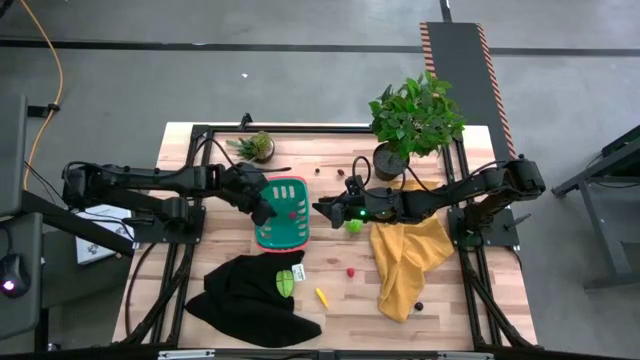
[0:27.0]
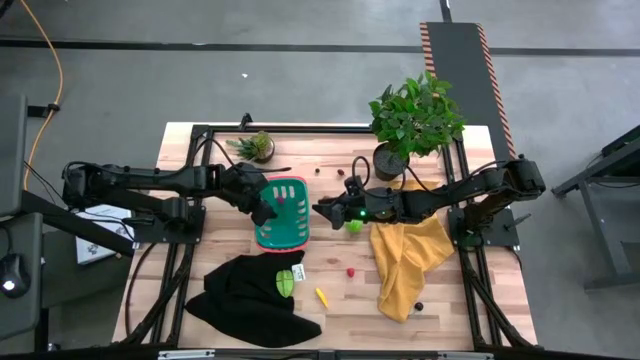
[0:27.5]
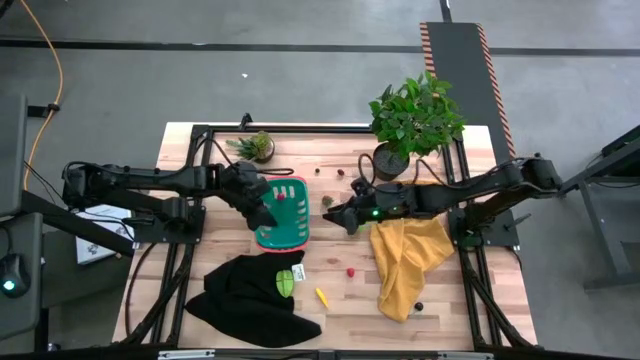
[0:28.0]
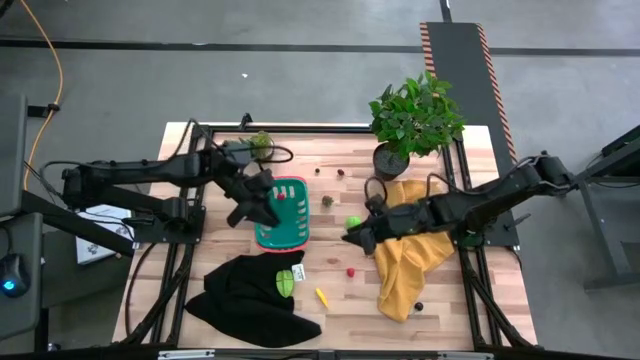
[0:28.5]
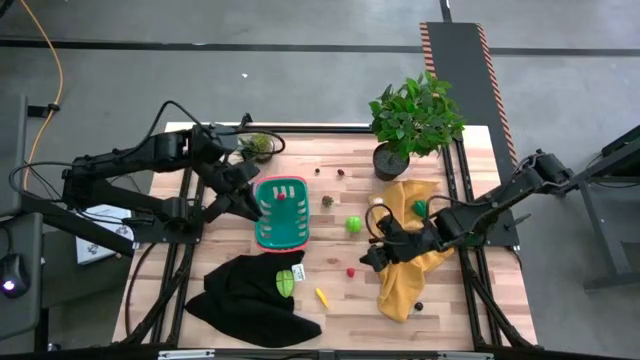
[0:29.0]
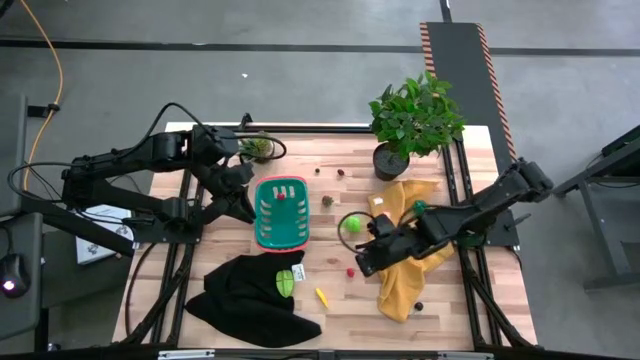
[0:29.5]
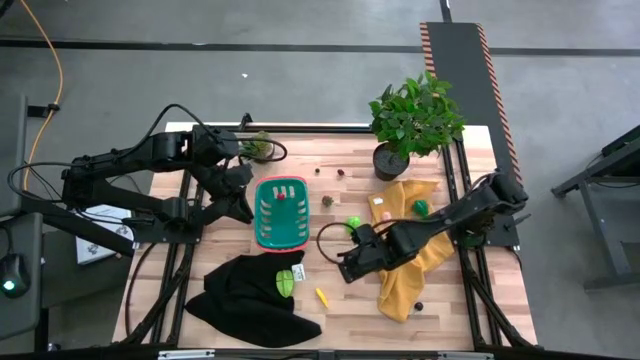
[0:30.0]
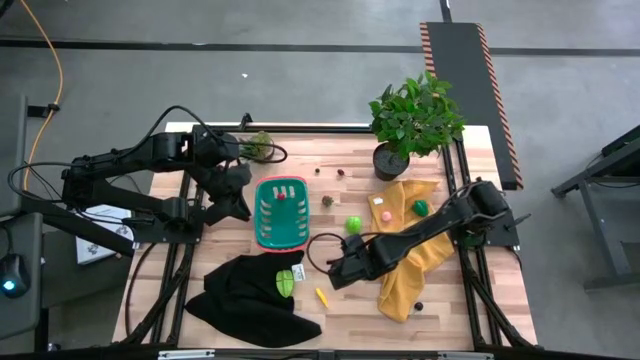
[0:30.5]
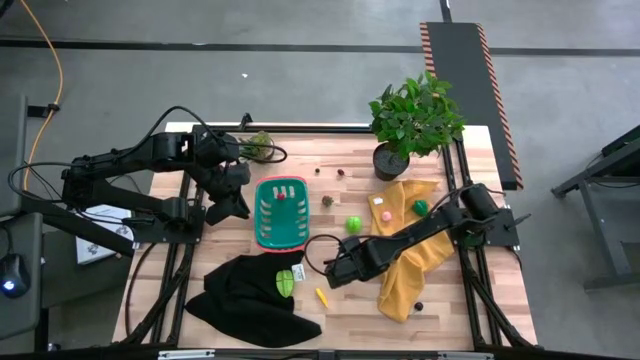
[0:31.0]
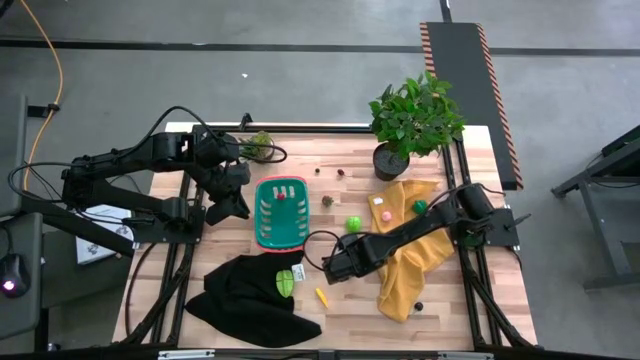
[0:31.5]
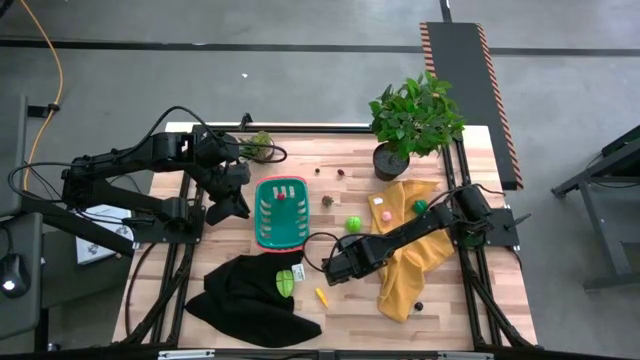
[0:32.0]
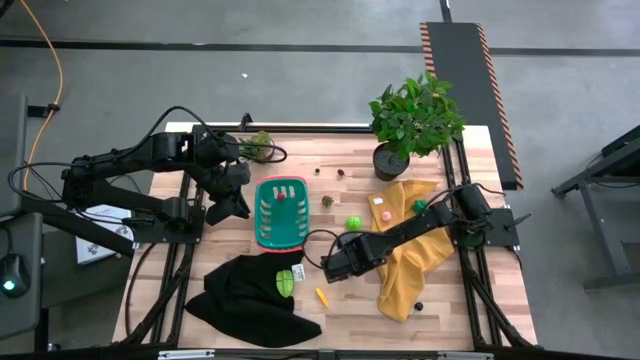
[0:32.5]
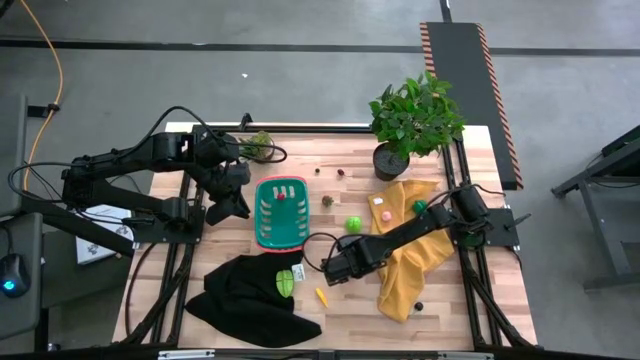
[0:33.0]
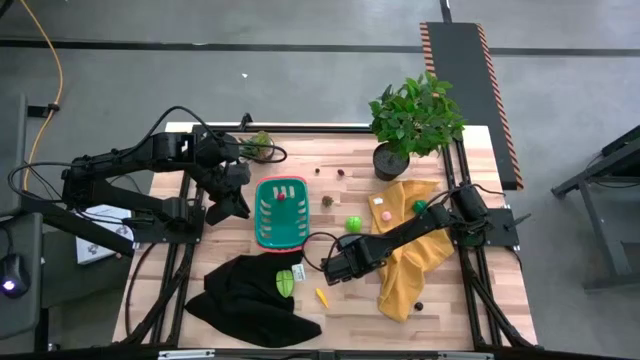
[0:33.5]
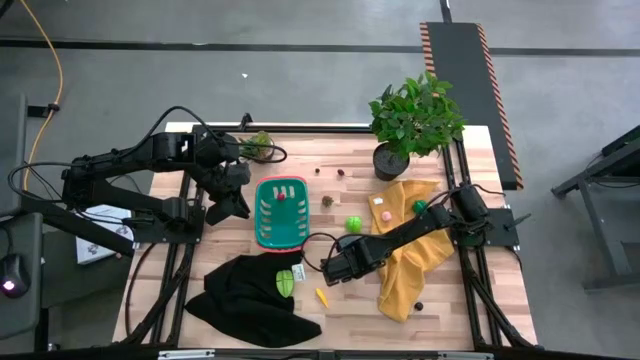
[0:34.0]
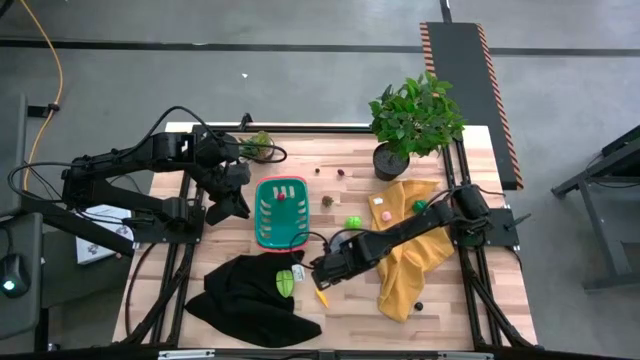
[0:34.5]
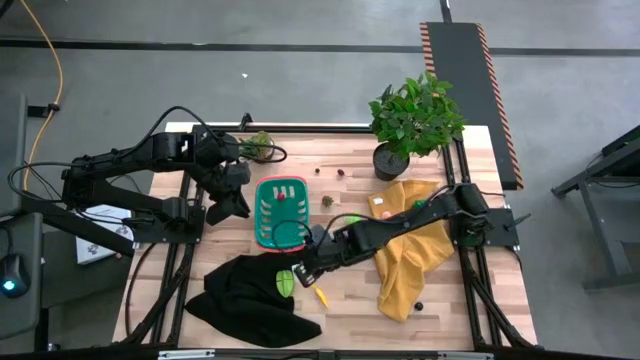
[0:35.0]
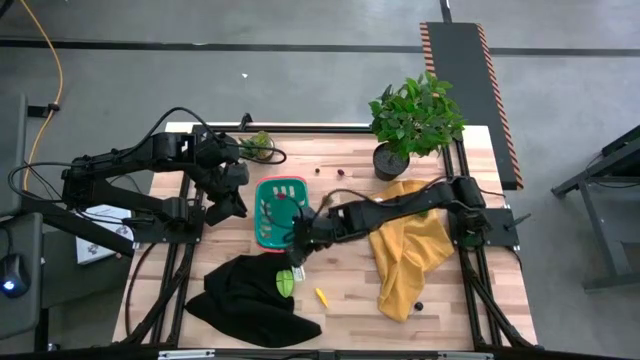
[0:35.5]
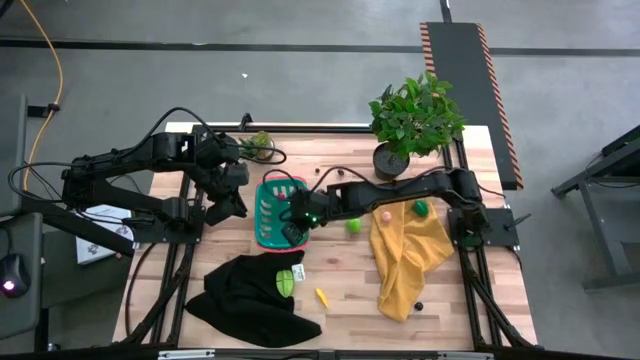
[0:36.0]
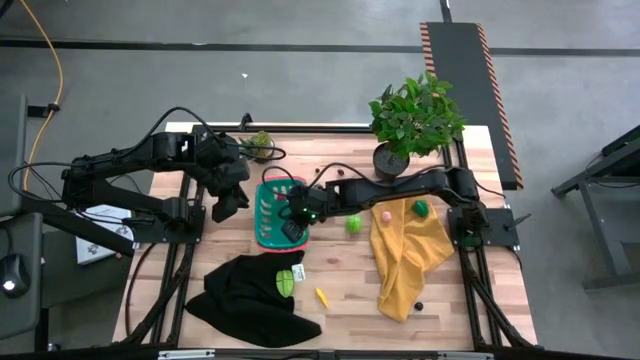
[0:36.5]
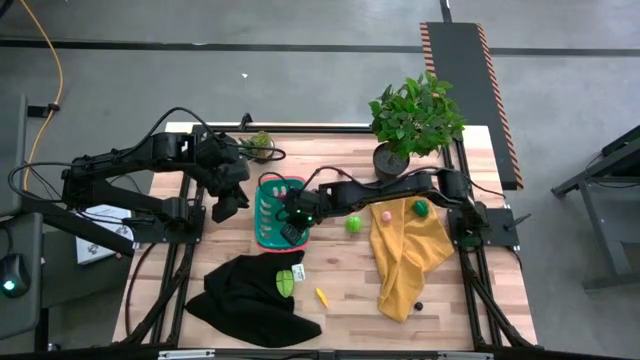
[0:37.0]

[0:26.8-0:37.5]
Task: Pick and placing Produce into tupperware
Put the red raspberry in the green basket

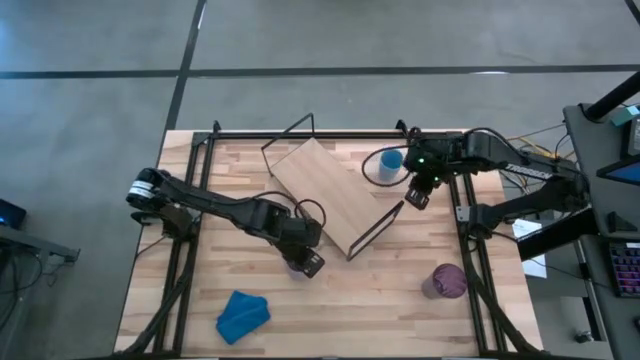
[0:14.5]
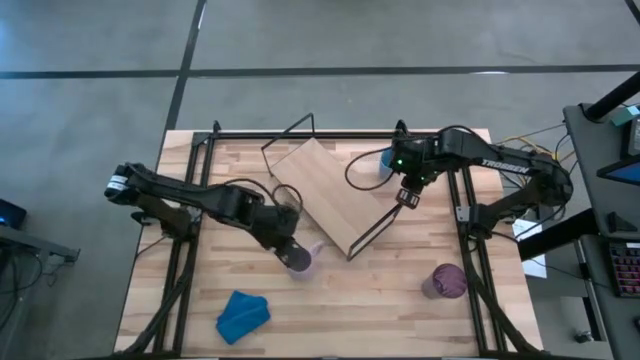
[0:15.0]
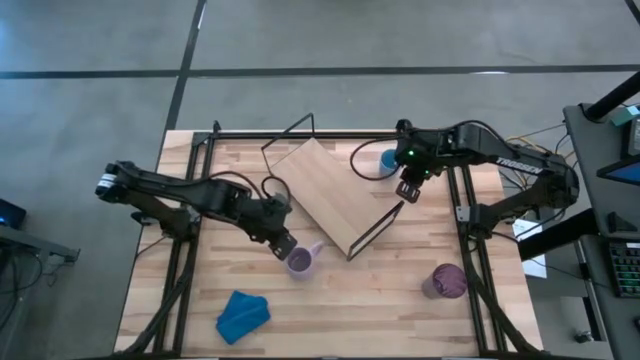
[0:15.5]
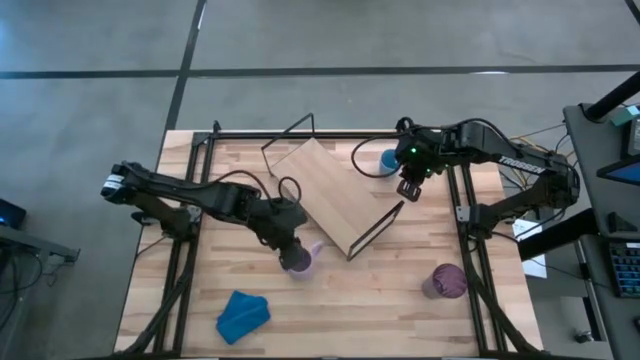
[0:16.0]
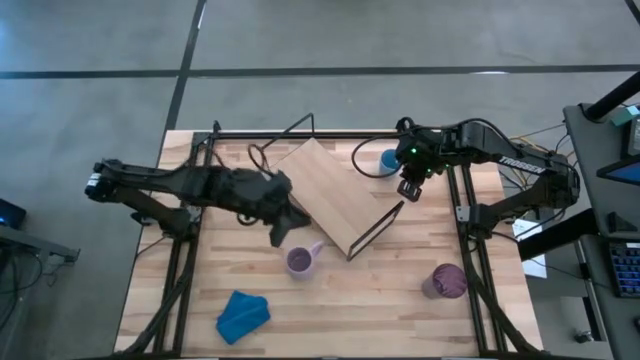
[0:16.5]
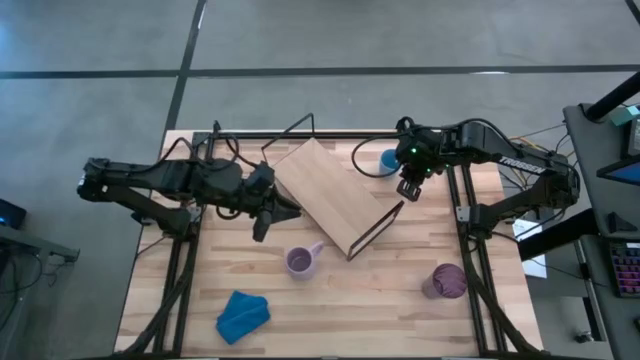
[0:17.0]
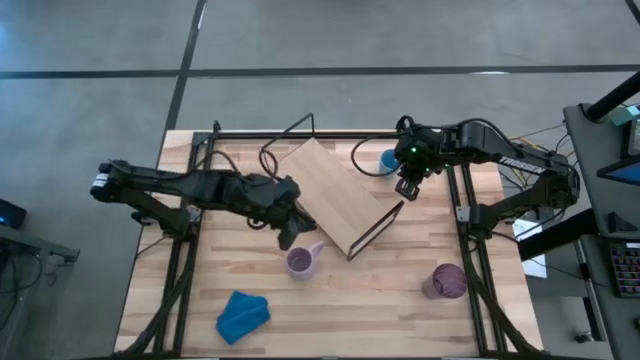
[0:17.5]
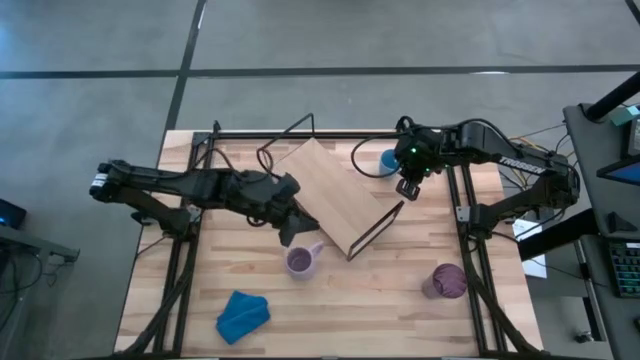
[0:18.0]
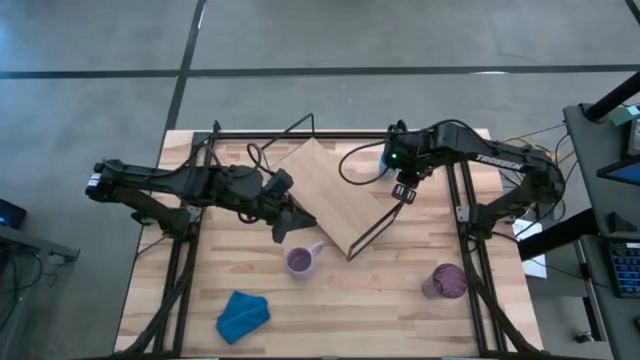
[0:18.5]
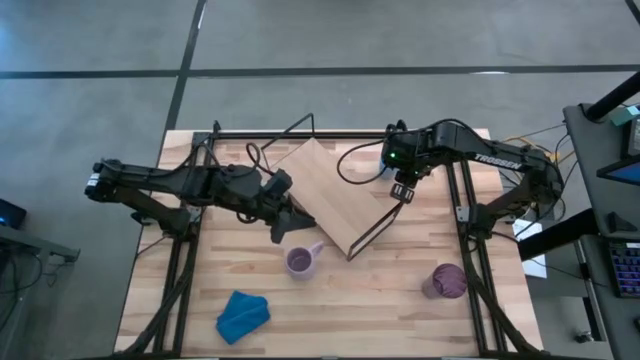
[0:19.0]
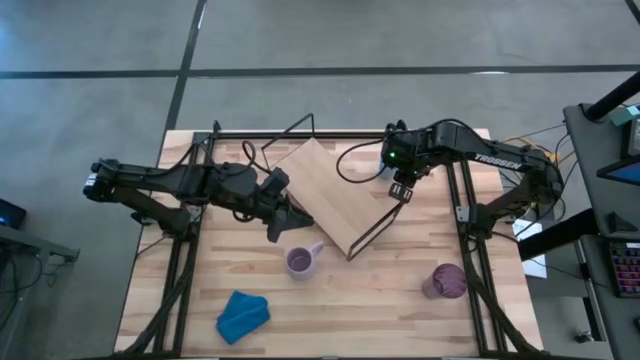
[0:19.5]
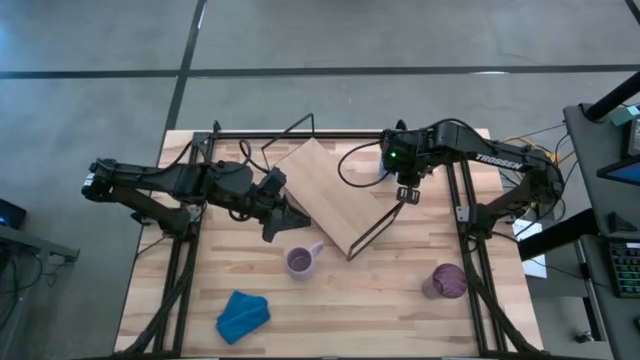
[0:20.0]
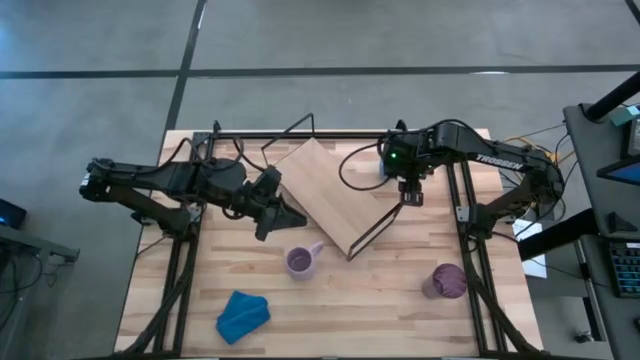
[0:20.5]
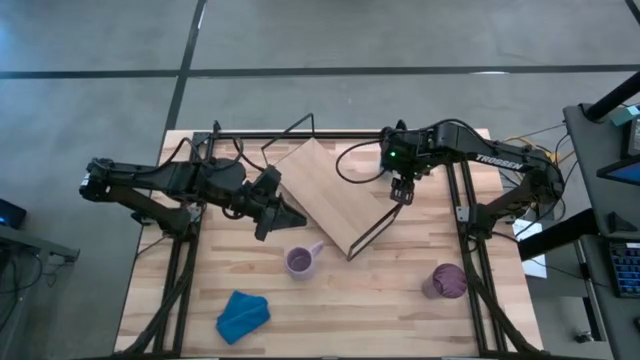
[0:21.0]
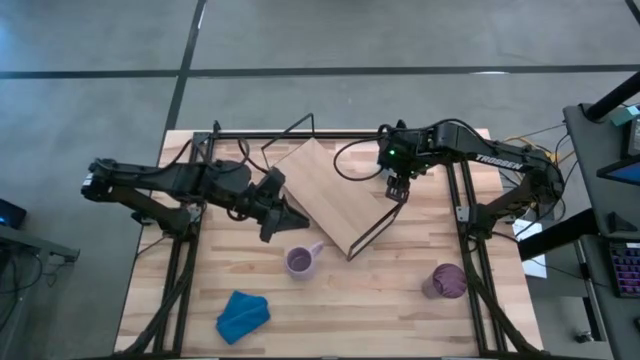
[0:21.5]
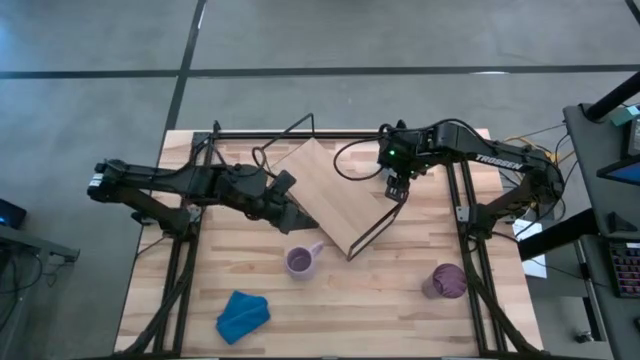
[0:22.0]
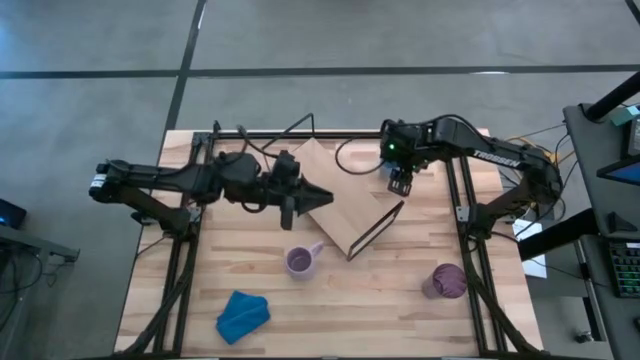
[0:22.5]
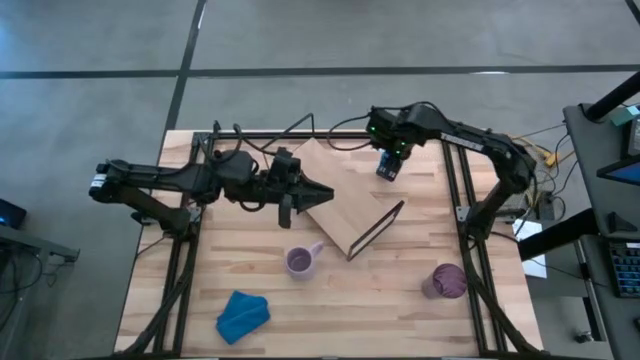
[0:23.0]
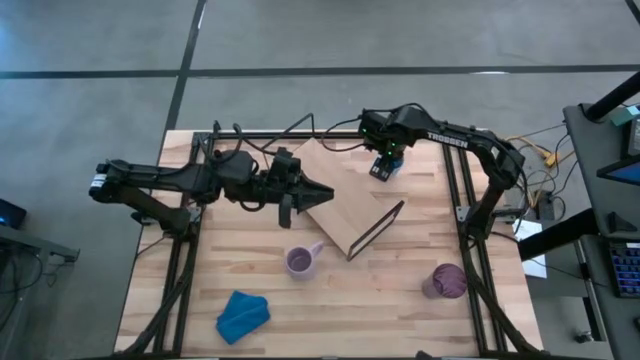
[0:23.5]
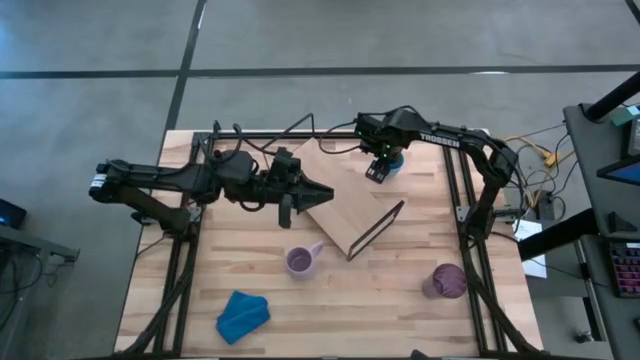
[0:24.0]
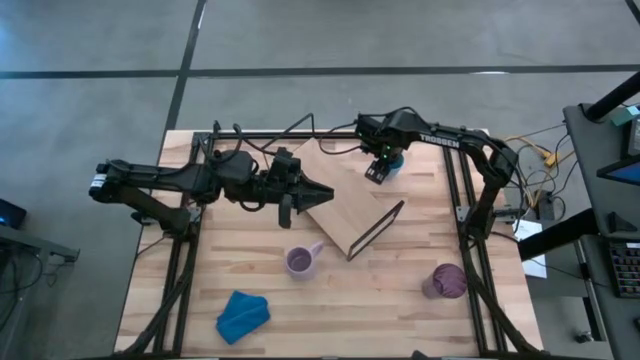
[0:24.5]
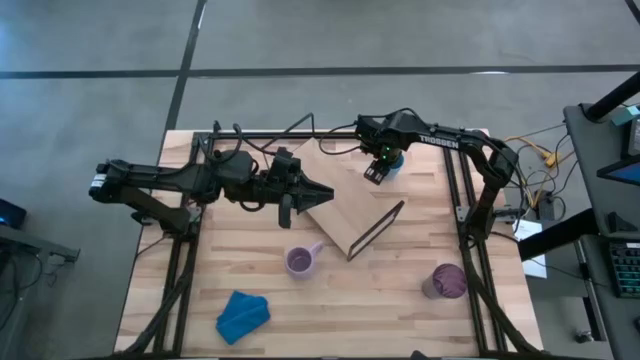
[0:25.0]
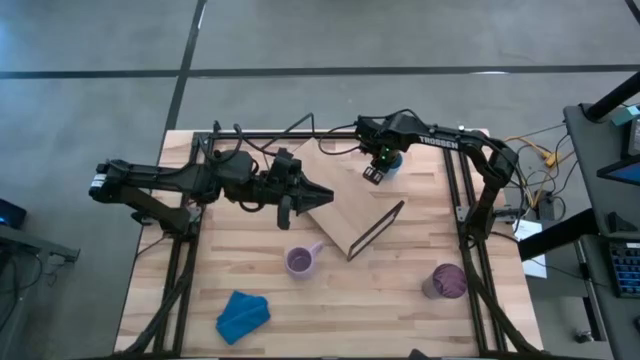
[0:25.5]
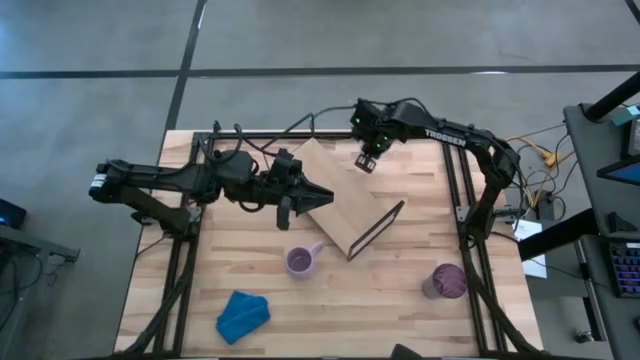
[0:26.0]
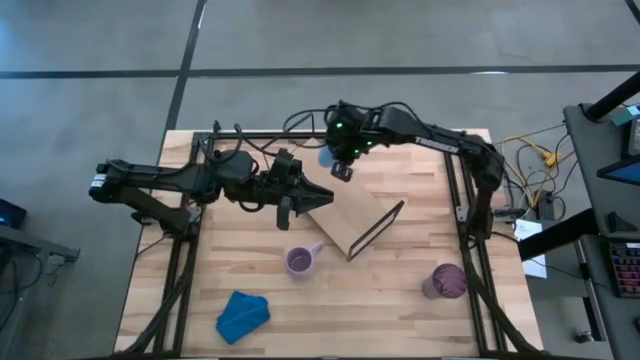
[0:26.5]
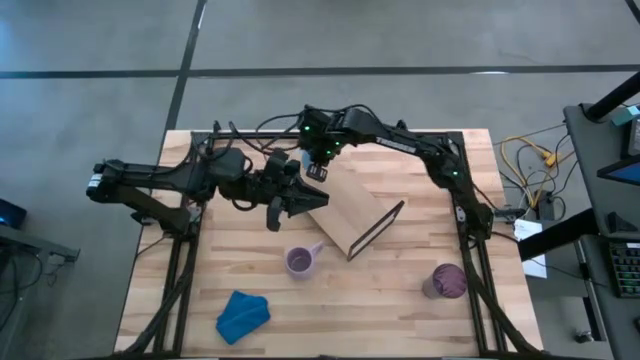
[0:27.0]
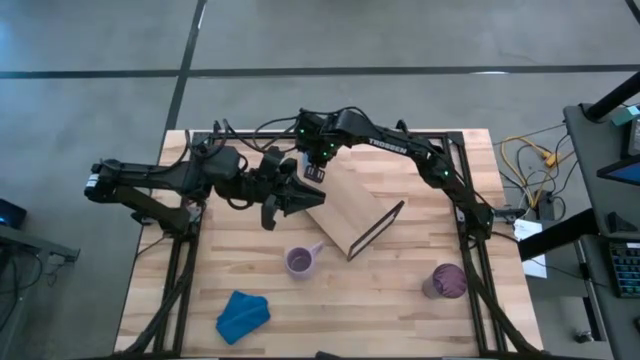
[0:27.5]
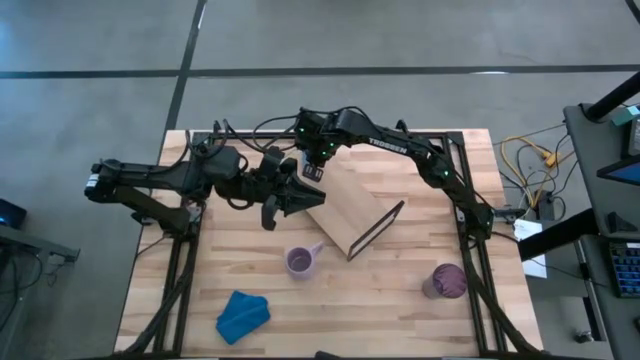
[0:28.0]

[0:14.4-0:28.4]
Task: Stack small to large cups/mugs on shelf
Put the blue cup on the shelf
